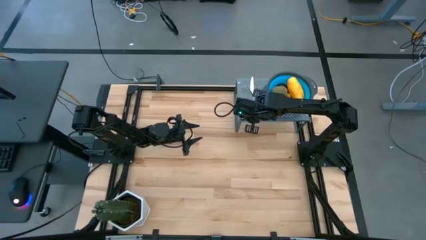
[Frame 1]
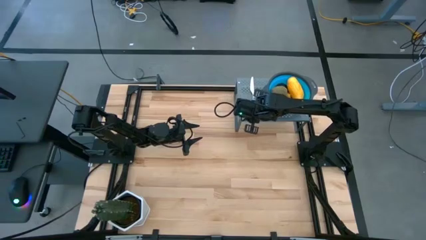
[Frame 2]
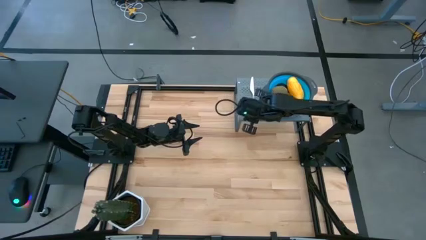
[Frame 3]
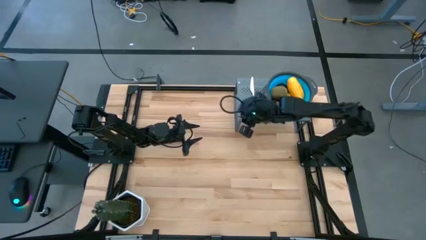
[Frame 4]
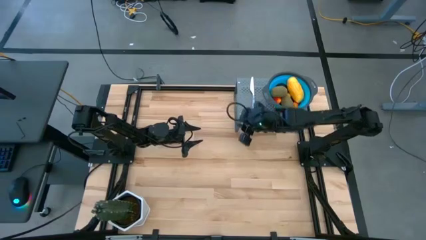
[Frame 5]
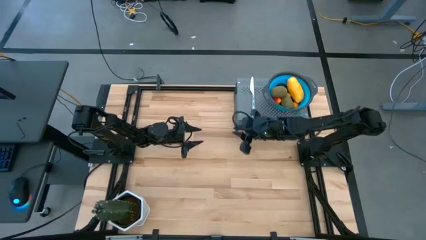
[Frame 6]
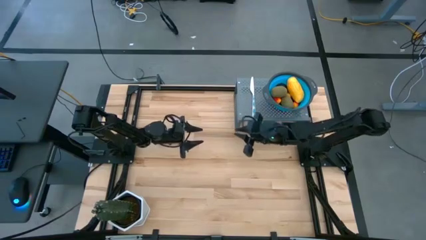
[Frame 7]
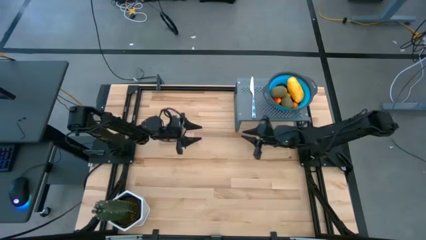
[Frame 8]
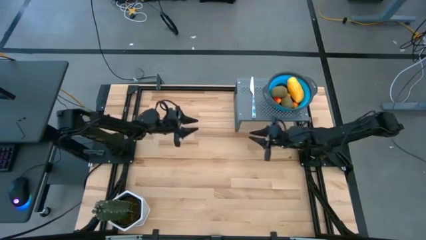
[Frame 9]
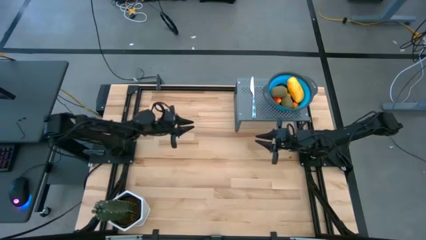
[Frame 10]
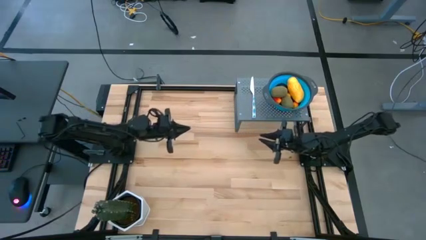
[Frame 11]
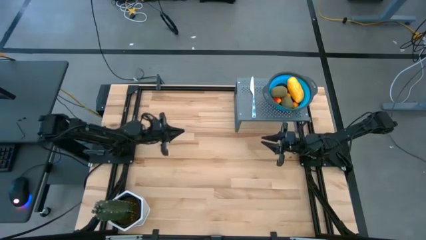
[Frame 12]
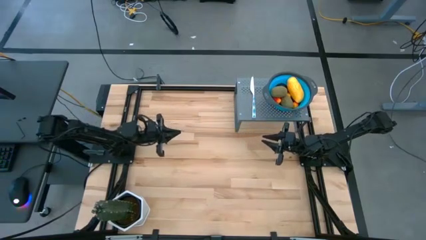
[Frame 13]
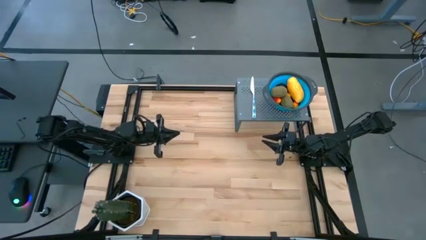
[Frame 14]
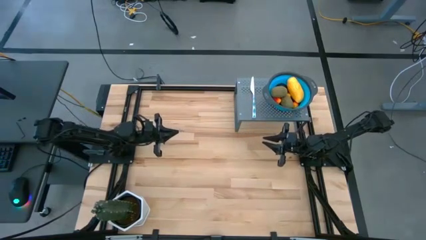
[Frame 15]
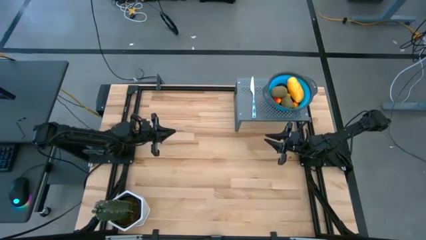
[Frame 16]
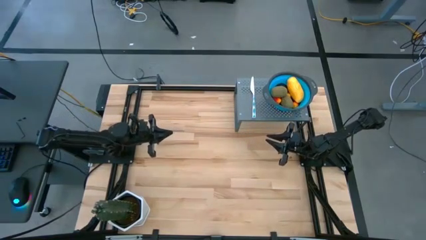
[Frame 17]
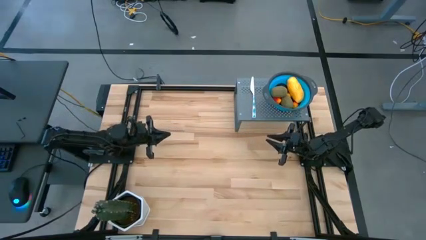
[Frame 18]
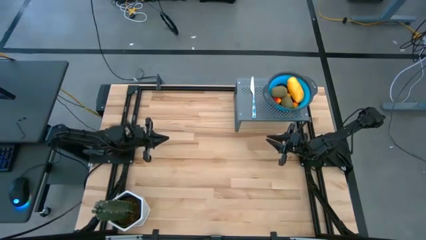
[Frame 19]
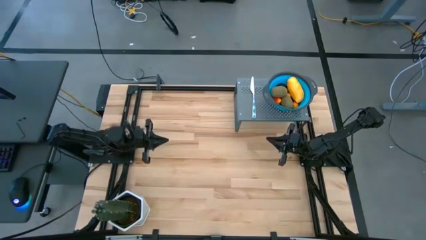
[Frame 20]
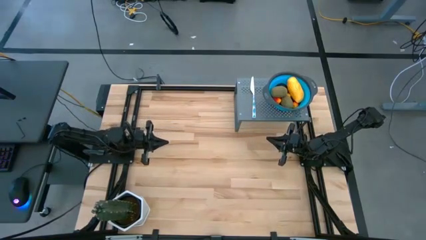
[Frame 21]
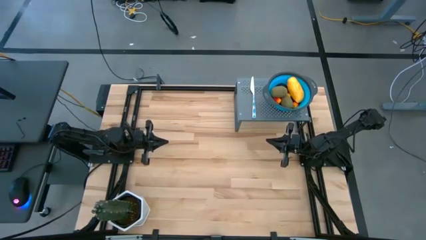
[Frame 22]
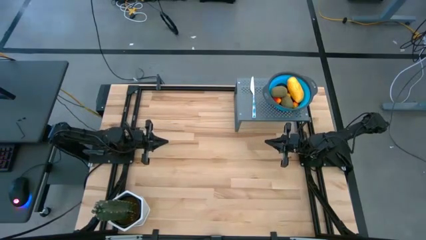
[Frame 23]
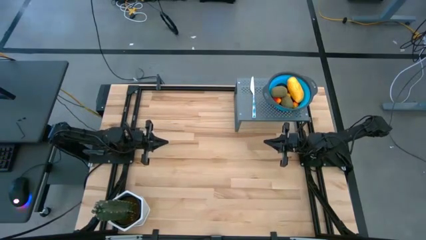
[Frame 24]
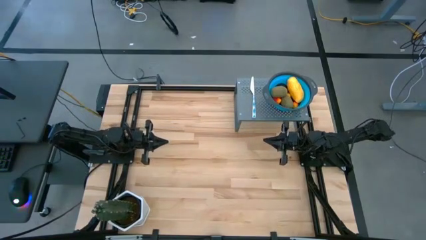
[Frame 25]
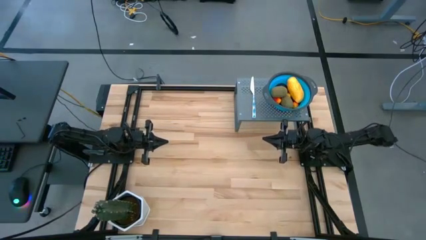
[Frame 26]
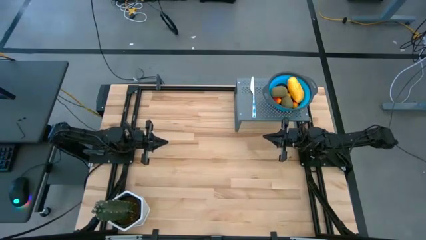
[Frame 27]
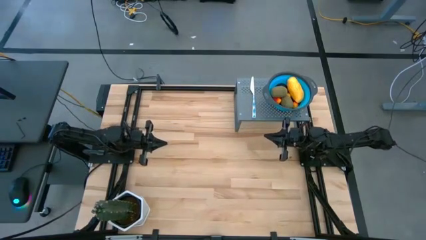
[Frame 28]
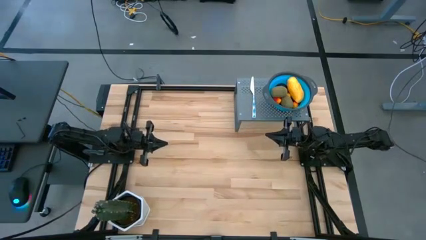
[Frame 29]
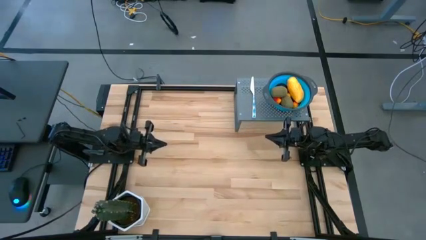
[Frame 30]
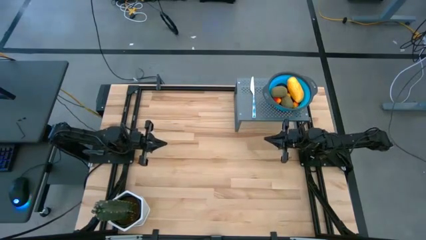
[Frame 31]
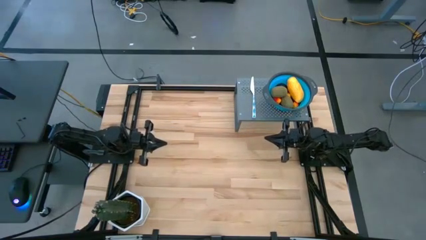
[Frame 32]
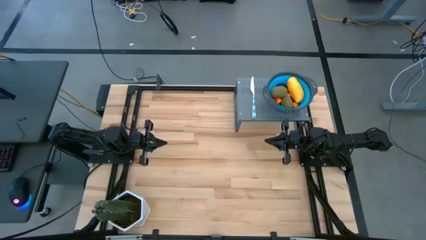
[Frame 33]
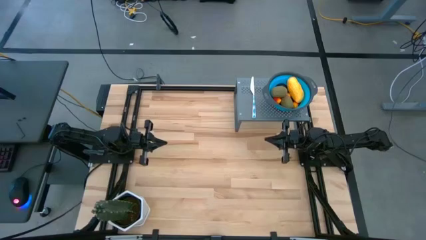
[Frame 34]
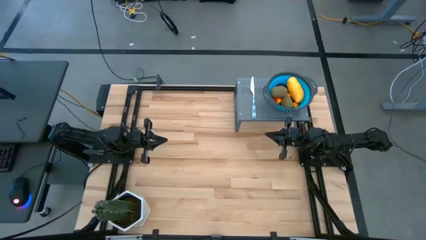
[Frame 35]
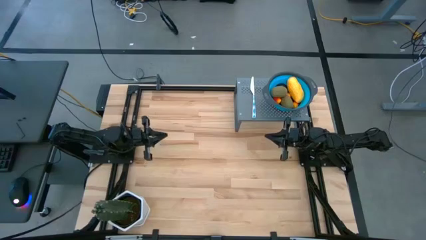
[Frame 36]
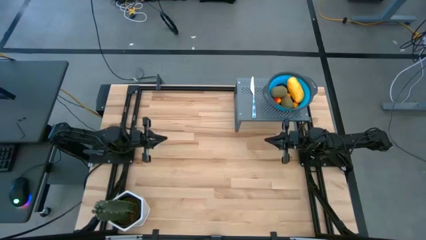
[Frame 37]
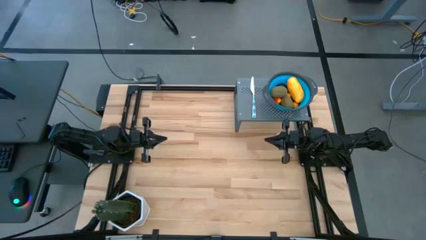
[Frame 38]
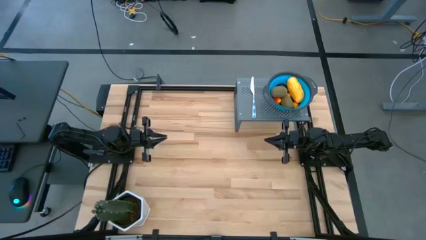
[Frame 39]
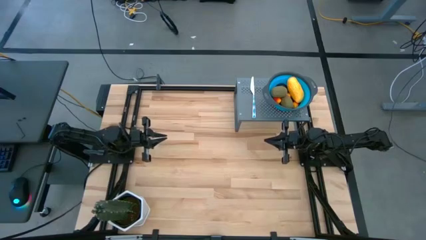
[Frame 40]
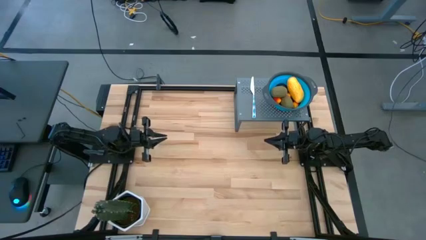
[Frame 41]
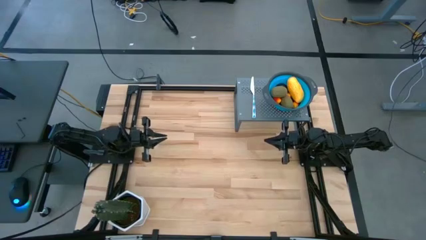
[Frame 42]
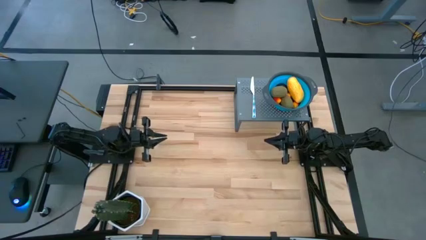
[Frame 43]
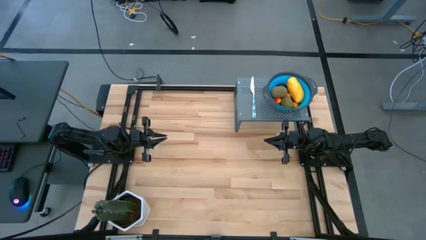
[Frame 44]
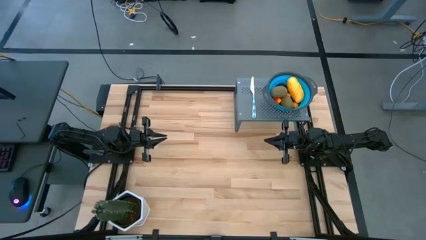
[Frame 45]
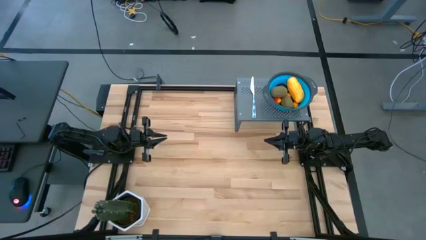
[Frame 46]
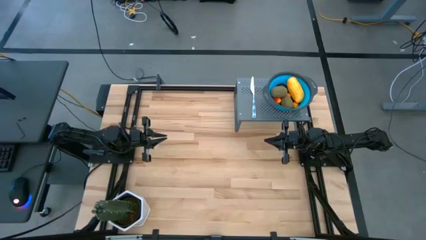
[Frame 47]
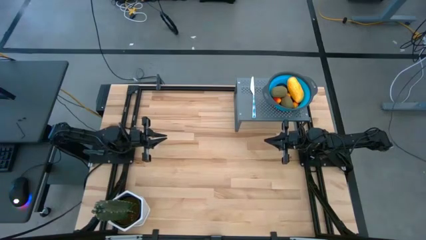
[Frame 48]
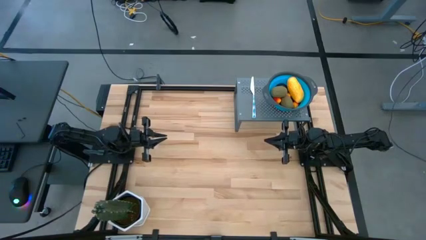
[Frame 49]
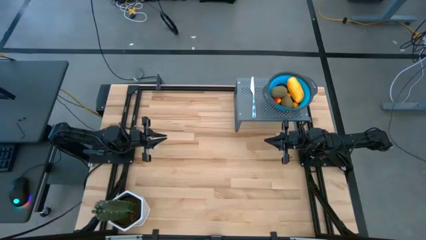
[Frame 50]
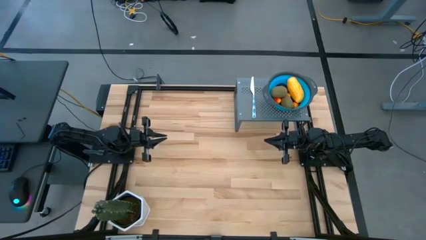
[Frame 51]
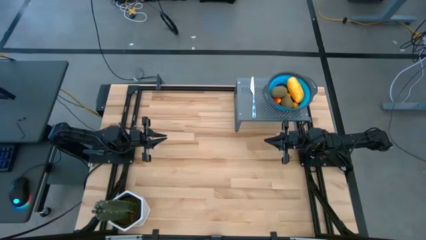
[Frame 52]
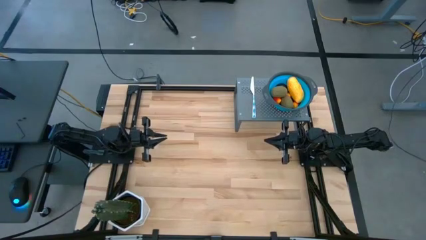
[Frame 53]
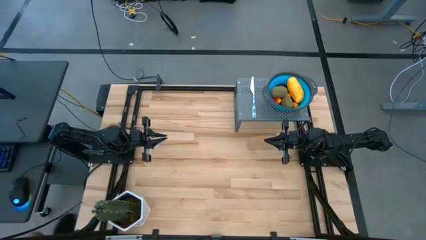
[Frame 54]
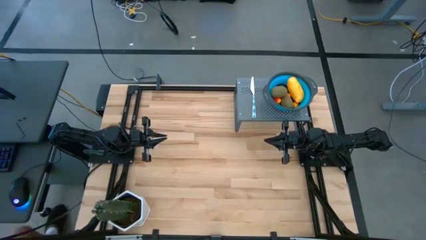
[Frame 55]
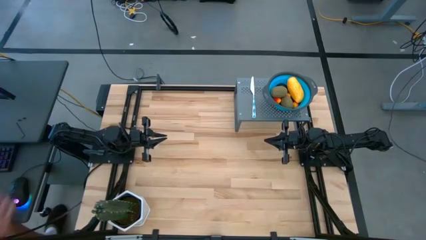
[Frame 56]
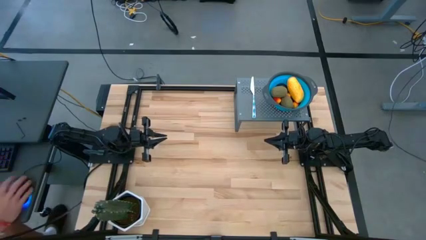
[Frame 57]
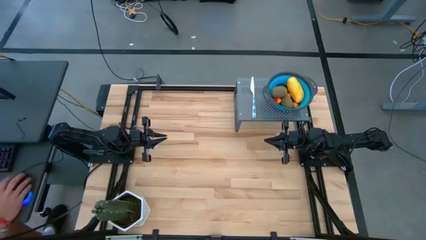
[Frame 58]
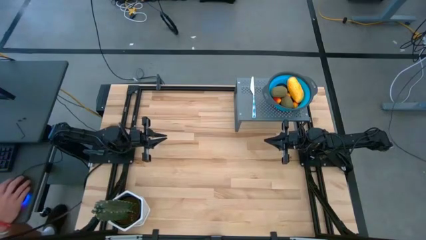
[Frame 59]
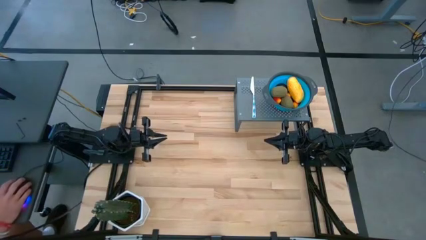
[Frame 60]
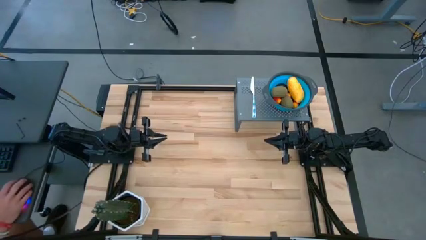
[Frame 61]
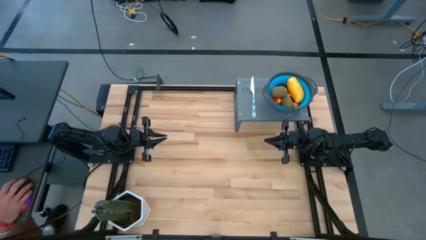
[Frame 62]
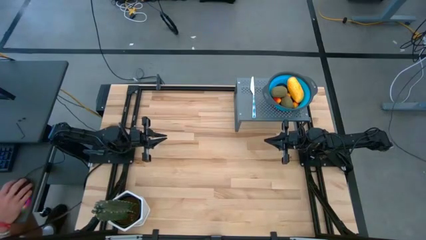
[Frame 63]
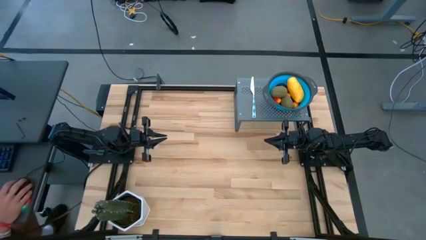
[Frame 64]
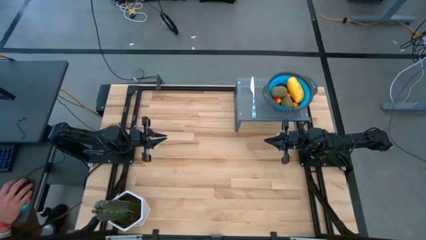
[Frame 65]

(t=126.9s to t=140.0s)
Task: Pick & Place Fruit
Return to Home Position
